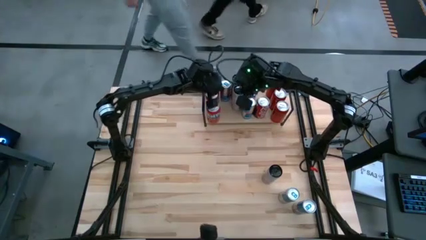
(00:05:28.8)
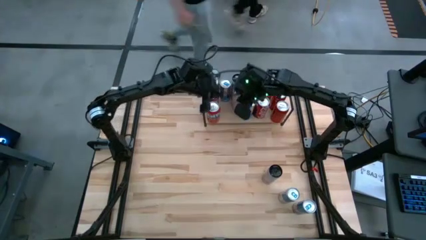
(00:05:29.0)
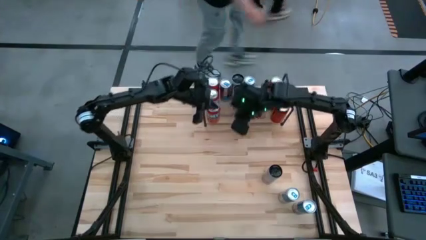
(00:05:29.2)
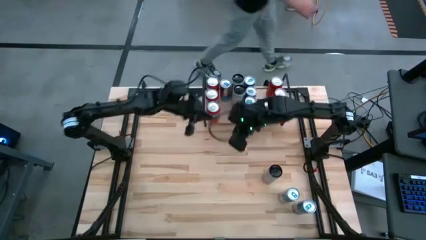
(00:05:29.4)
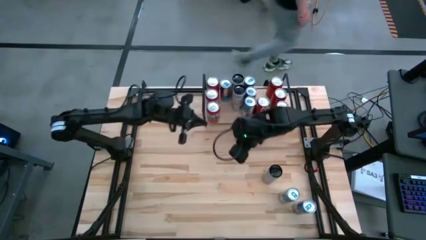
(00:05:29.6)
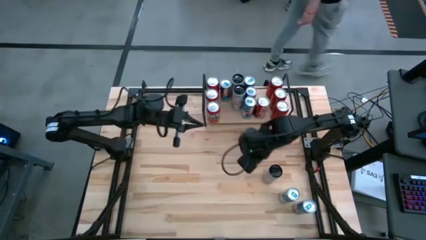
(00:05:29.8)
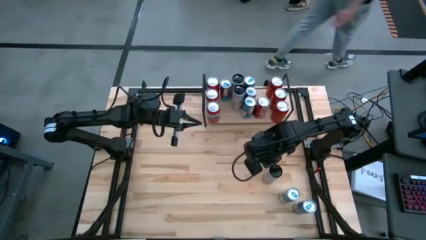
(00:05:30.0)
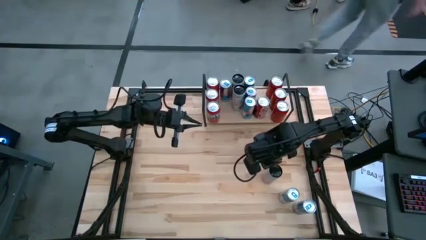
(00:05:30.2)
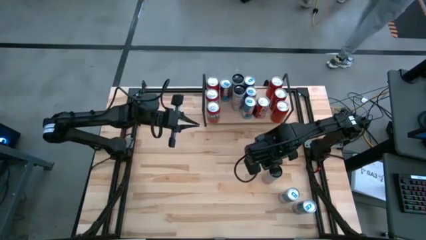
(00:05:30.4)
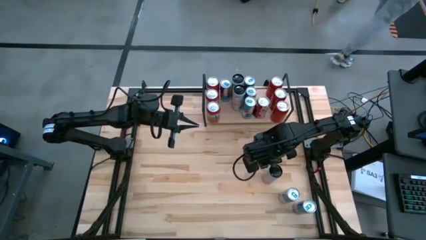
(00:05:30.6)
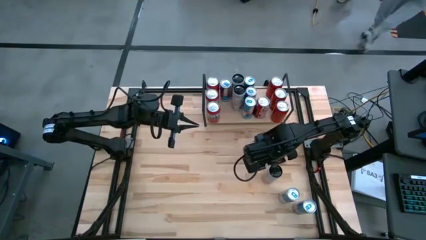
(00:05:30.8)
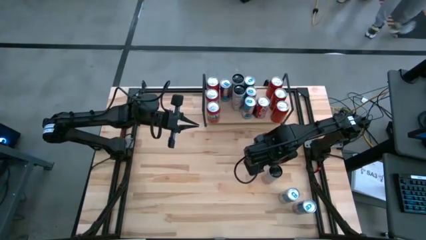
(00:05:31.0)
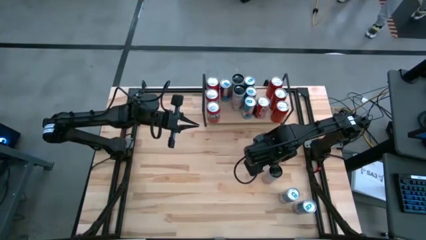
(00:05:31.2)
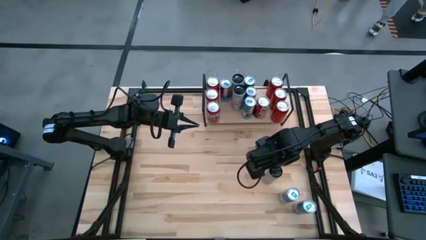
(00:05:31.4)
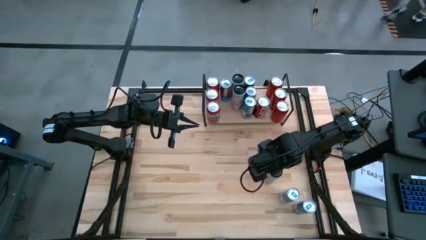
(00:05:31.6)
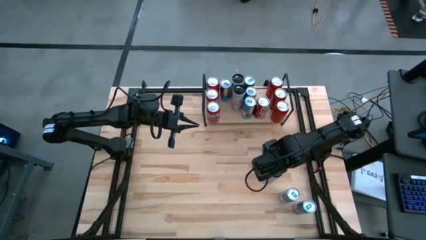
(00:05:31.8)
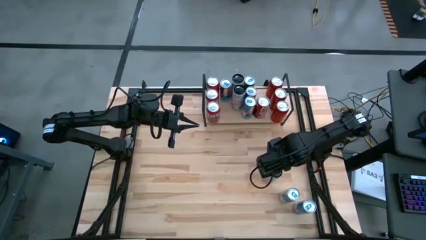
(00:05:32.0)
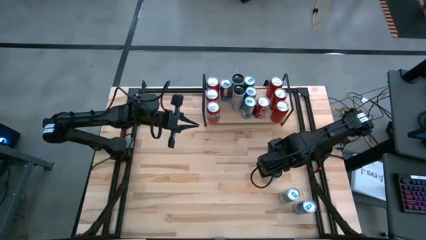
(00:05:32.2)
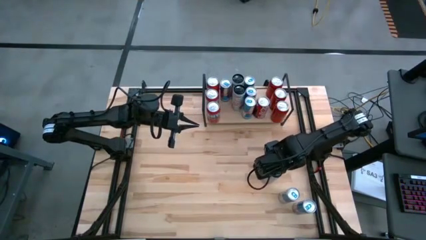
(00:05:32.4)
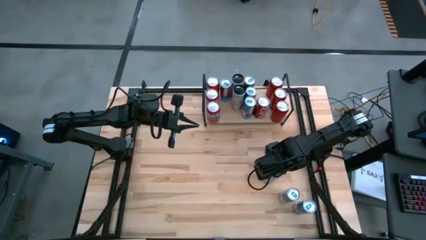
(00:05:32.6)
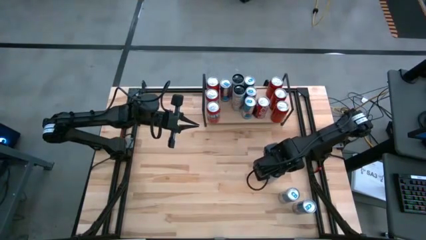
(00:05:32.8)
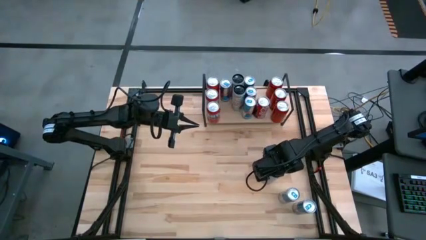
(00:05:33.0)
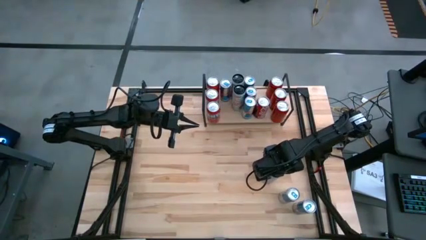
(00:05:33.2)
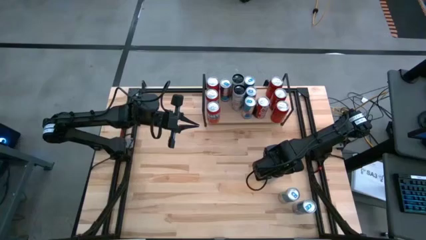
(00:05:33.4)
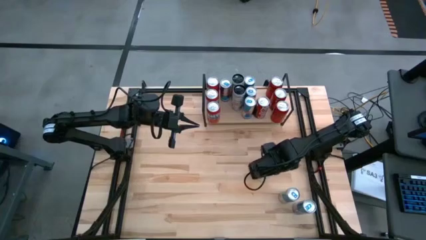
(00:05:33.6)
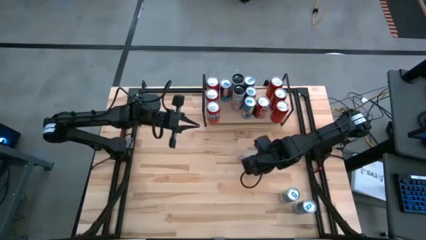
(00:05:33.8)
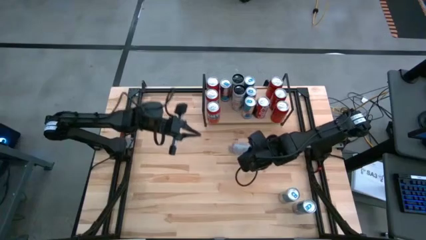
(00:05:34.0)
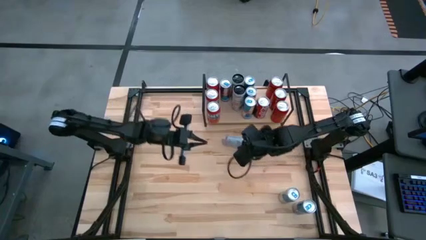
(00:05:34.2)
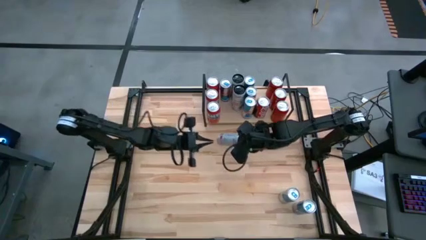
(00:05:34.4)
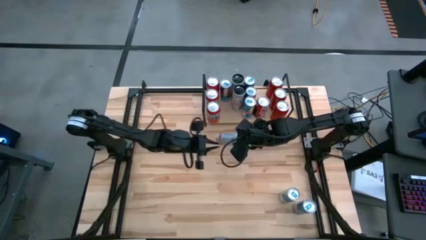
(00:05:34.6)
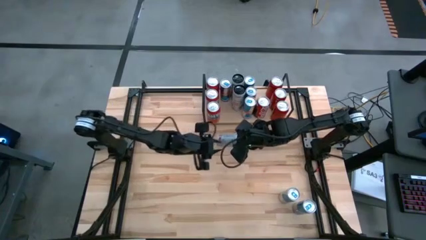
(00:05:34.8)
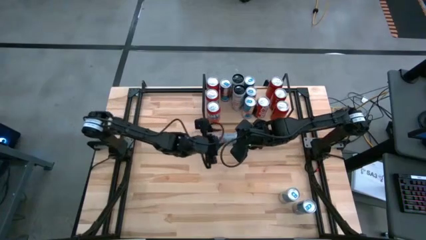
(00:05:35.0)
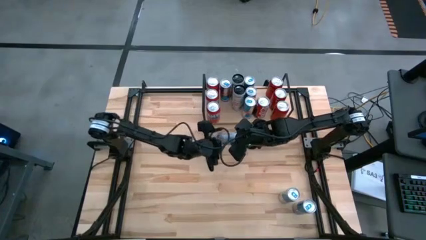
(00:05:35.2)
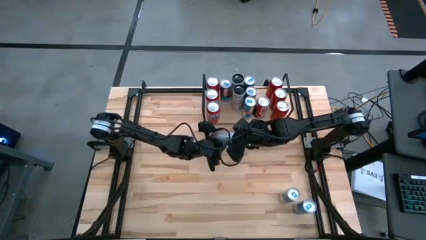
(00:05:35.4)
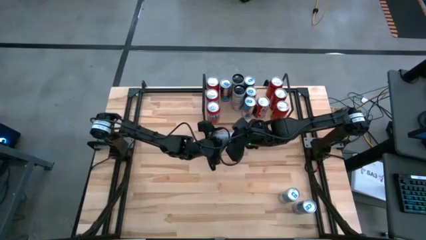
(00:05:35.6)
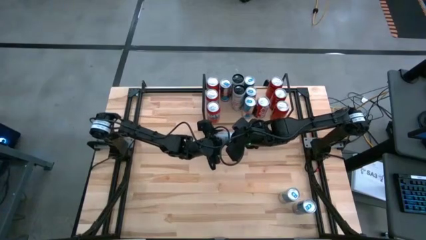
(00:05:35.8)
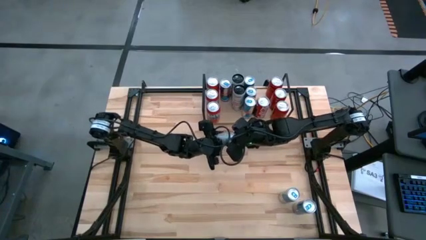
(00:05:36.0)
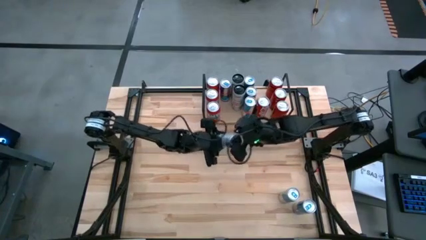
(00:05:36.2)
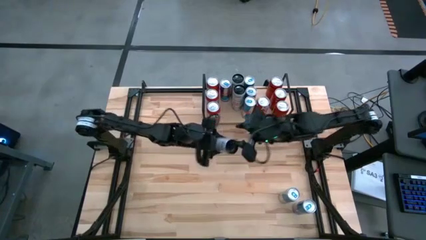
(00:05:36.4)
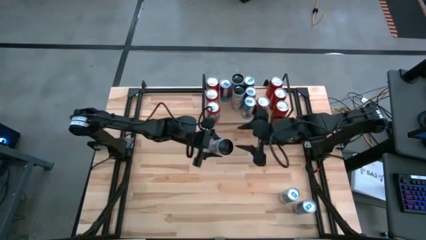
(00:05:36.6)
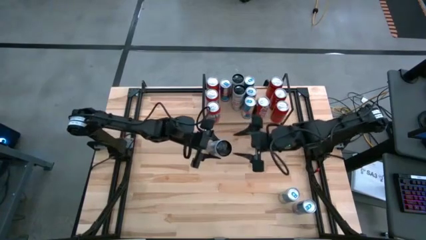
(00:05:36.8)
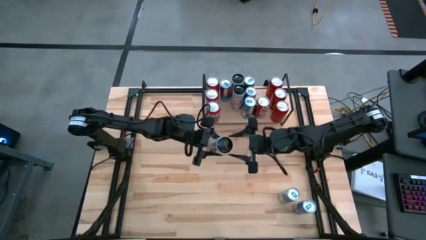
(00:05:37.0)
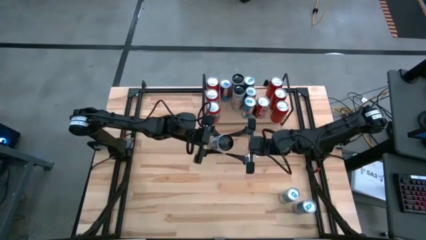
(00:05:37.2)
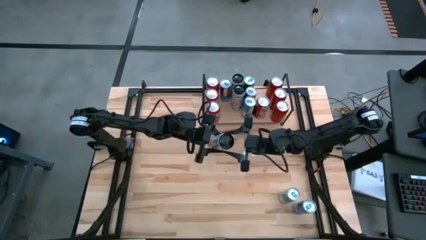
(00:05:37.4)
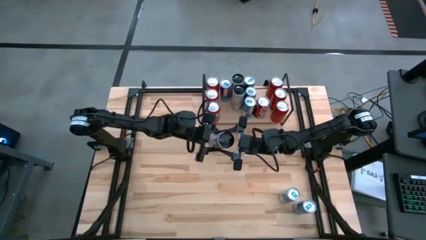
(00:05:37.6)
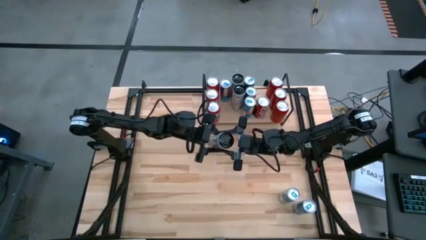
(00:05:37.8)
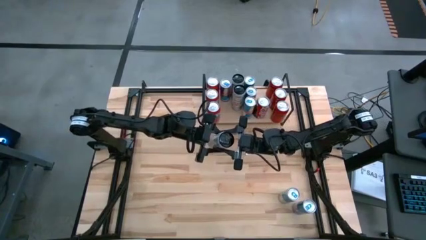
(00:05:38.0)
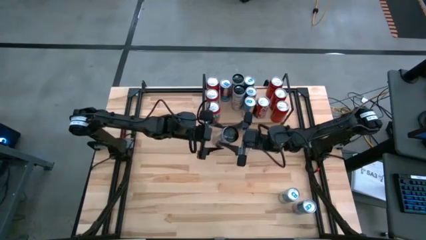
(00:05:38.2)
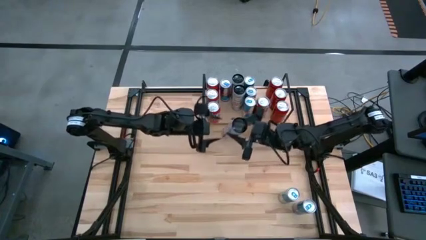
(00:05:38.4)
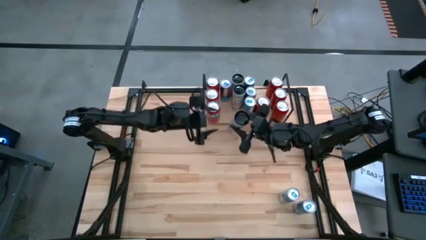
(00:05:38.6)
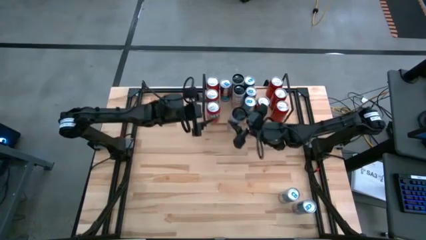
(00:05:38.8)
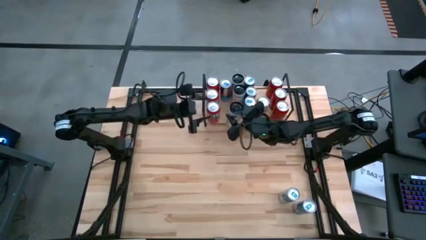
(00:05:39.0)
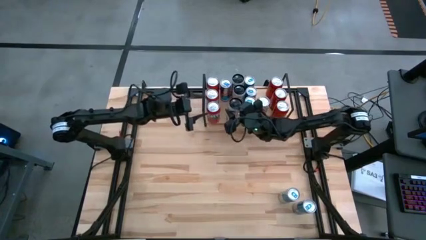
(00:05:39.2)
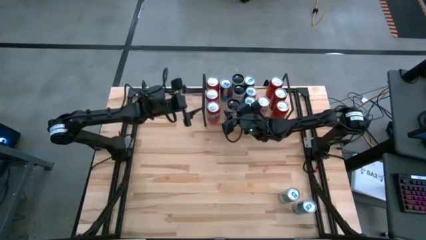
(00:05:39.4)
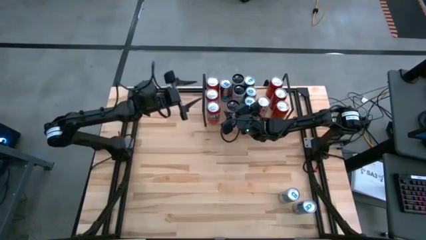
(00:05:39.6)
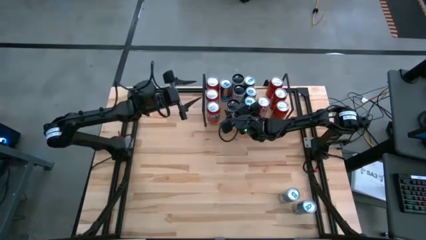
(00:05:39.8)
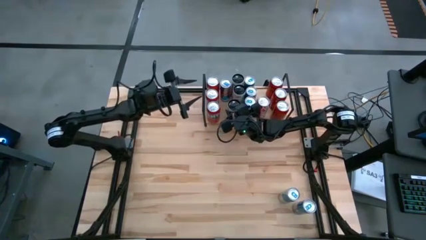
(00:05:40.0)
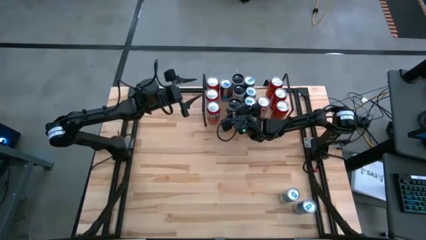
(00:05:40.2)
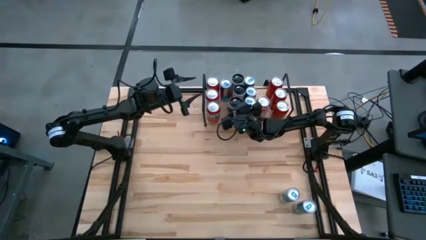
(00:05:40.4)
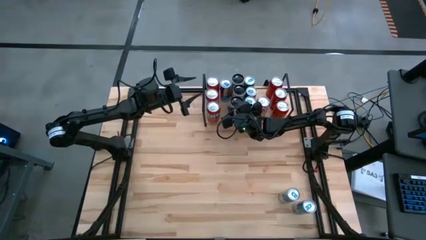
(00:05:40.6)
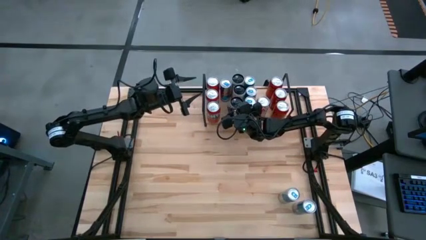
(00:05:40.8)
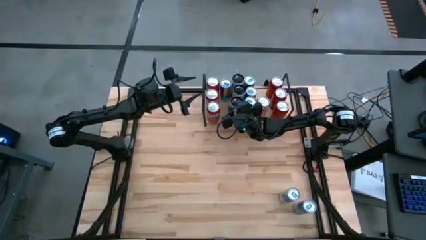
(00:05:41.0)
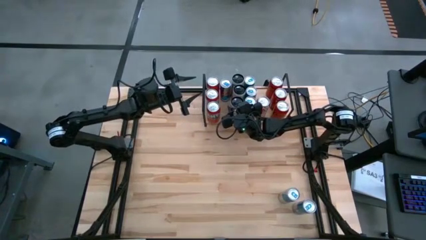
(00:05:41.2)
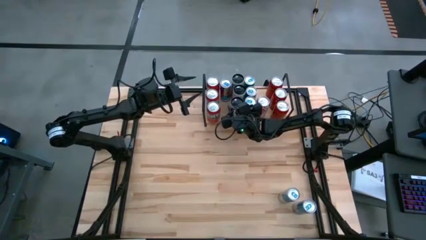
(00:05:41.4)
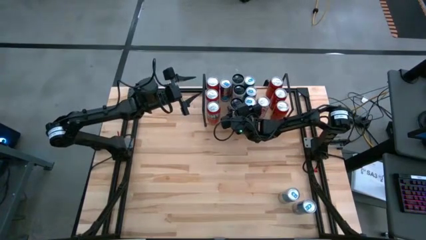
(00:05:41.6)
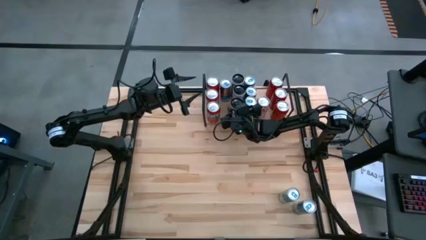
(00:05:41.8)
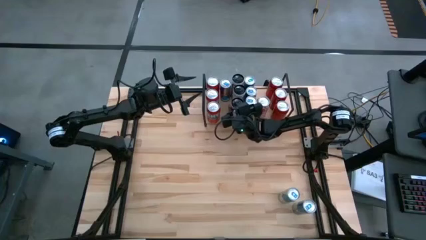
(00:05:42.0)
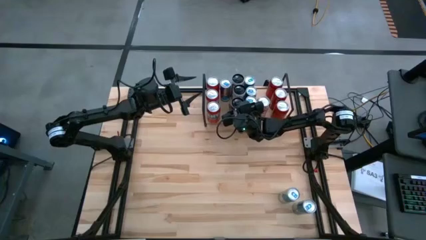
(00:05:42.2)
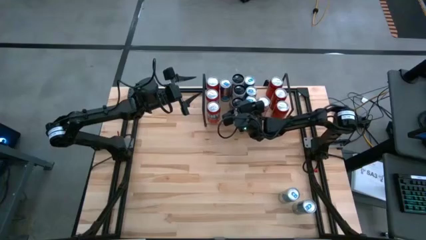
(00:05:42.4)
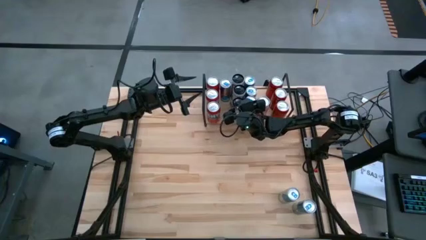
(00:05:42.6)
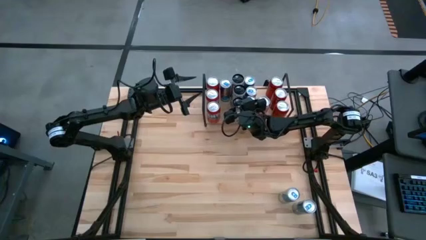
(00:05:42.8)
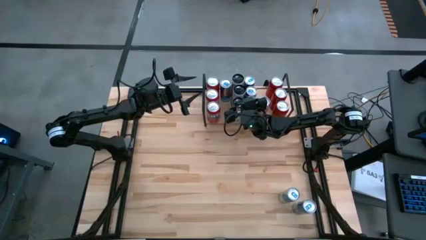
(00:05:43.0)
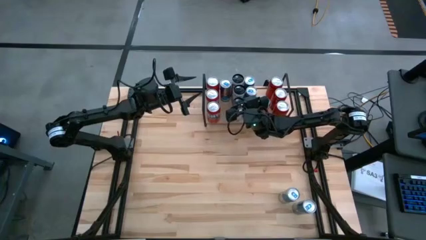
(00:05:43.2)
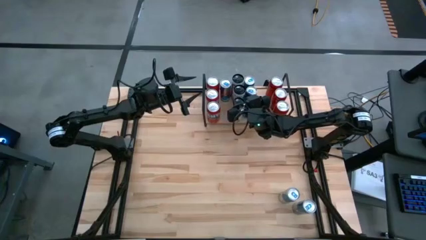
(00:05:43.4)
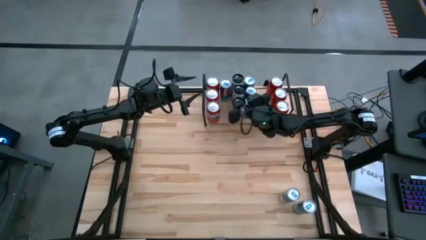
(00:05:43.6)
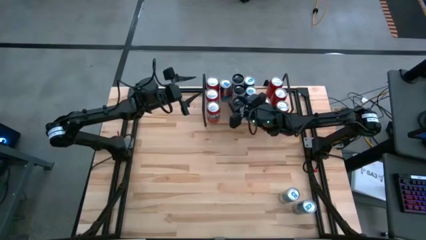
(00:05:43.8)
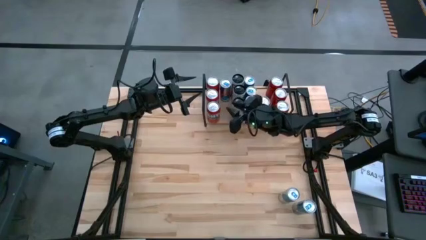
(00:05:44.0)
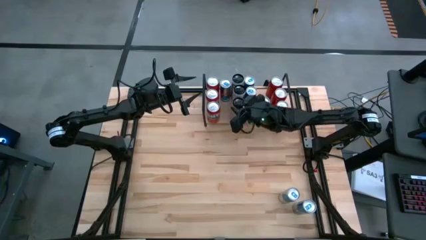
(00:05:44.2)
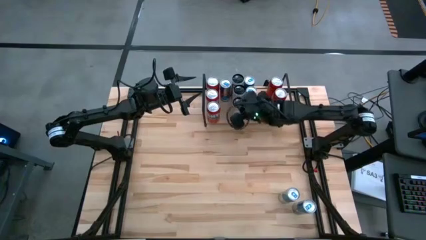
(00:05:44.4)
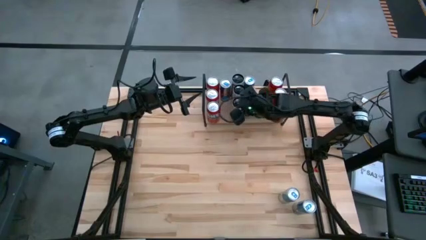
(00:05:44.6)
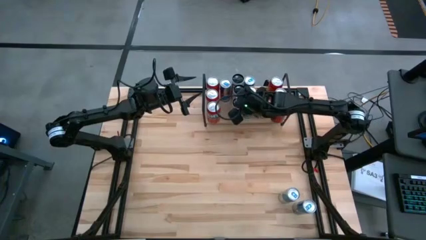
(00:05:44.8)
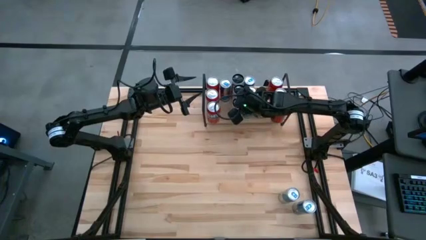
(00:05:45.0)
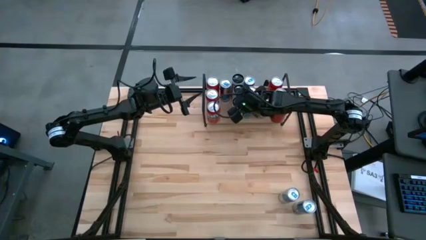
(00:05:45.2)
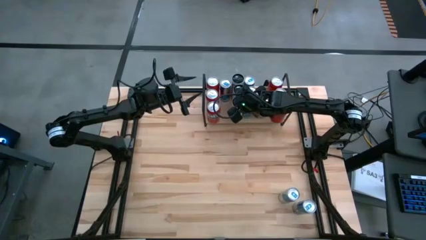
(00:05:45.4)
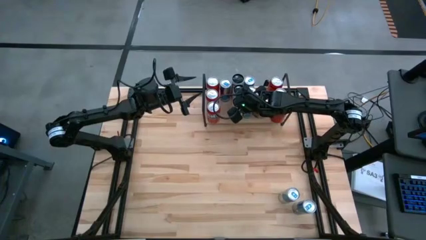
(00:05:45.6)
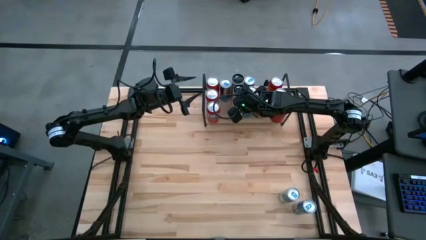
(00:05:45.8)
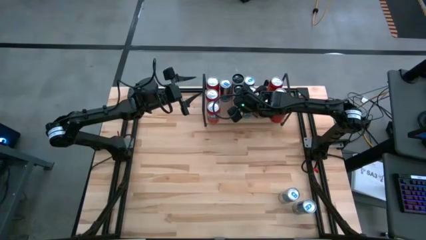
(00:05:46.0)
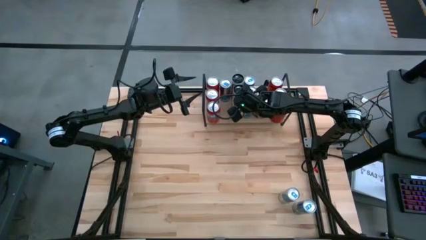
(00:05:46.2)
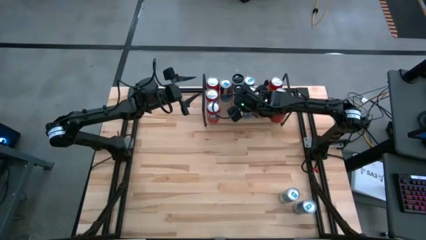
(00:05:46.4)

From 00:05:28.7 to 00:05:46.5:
Task: Place canned beverage on shelf
Put the white soda can on the shelf
